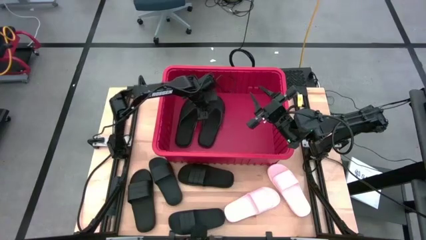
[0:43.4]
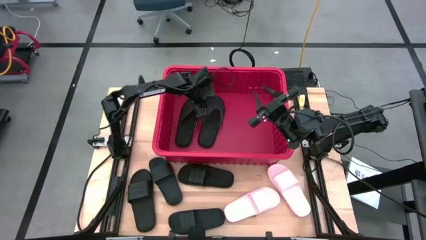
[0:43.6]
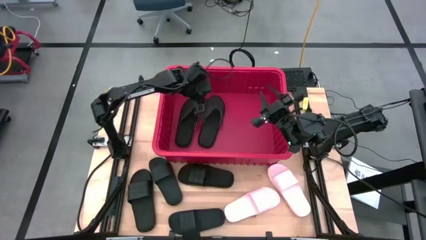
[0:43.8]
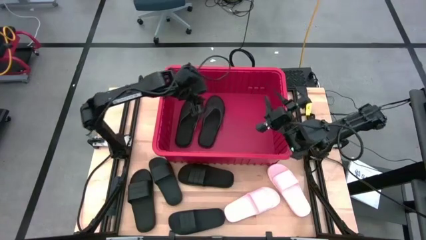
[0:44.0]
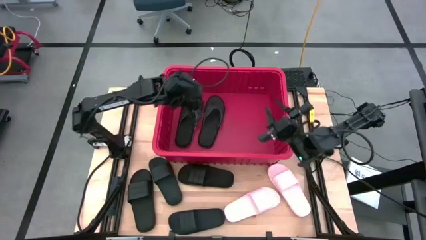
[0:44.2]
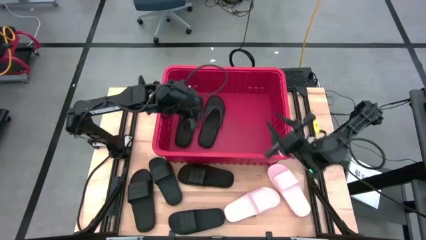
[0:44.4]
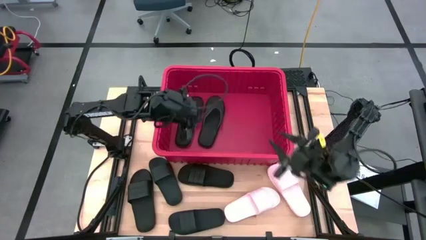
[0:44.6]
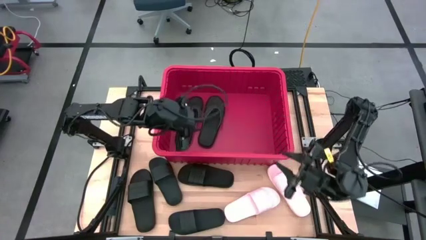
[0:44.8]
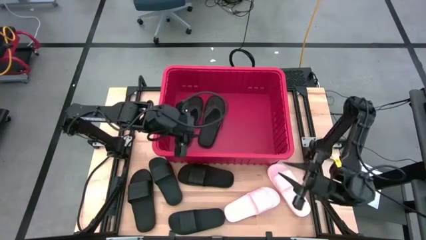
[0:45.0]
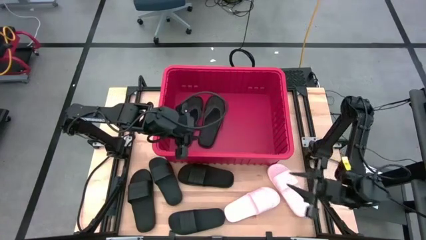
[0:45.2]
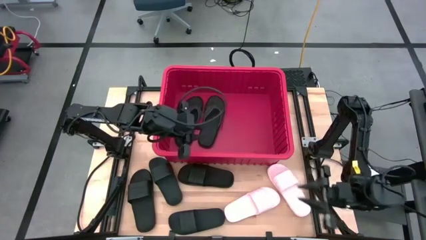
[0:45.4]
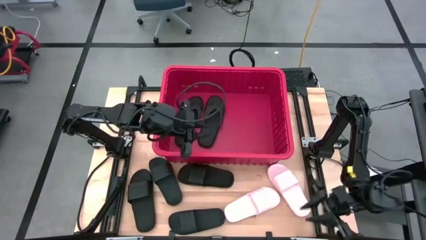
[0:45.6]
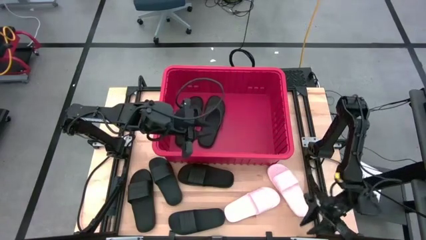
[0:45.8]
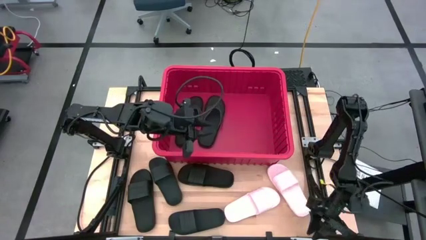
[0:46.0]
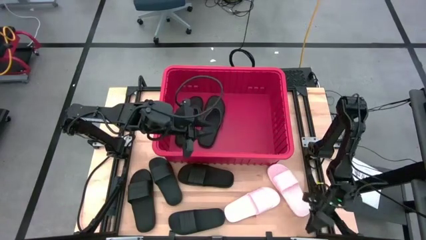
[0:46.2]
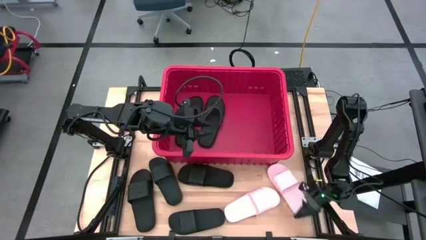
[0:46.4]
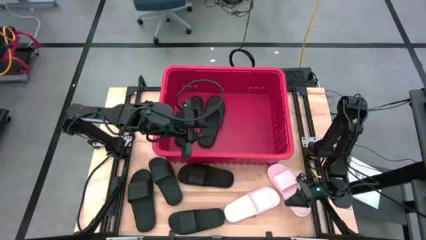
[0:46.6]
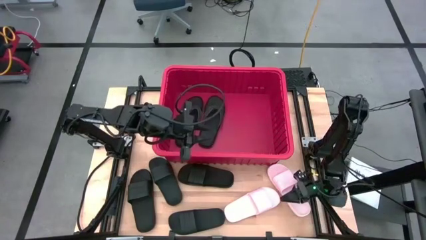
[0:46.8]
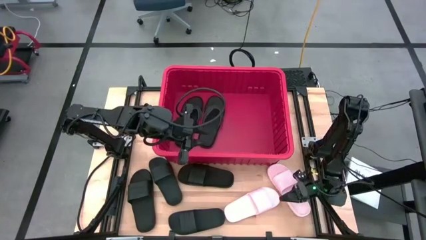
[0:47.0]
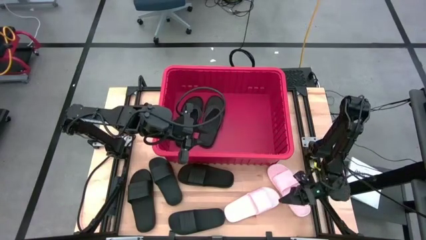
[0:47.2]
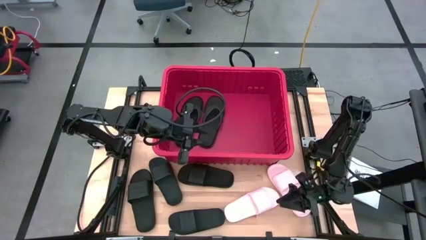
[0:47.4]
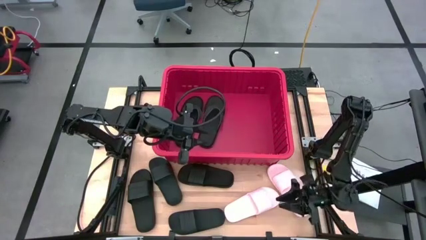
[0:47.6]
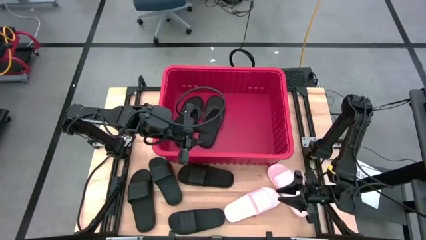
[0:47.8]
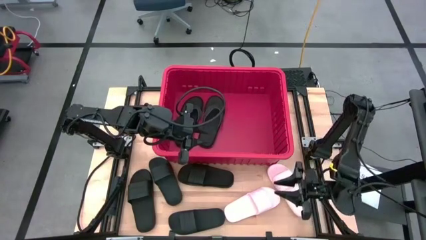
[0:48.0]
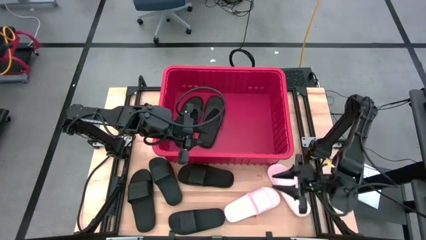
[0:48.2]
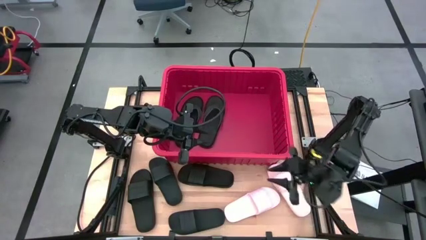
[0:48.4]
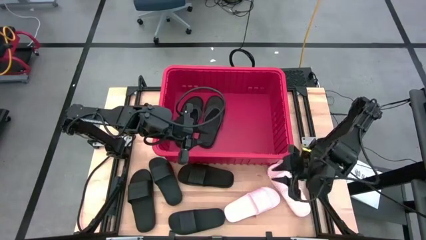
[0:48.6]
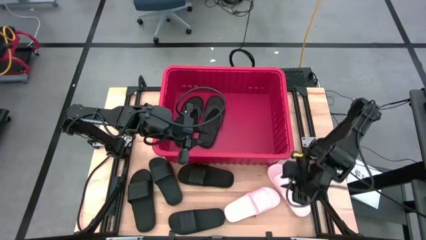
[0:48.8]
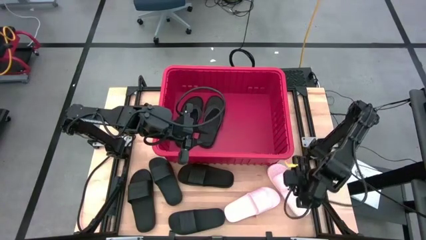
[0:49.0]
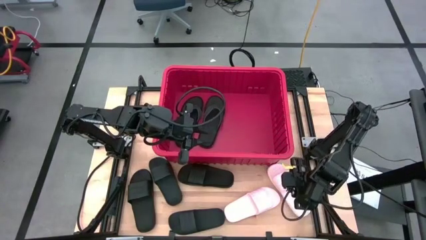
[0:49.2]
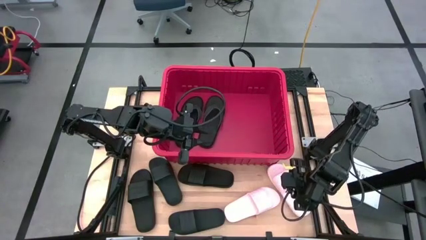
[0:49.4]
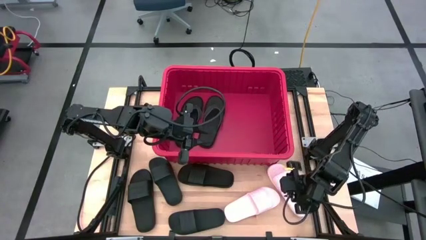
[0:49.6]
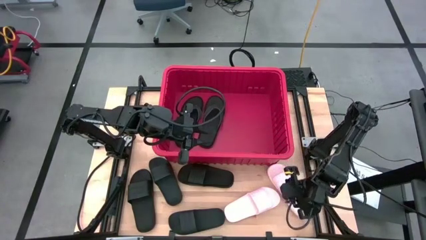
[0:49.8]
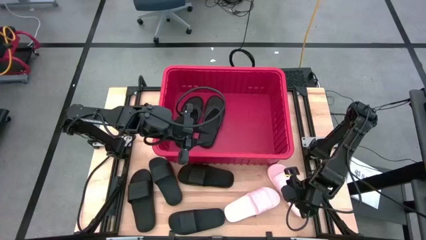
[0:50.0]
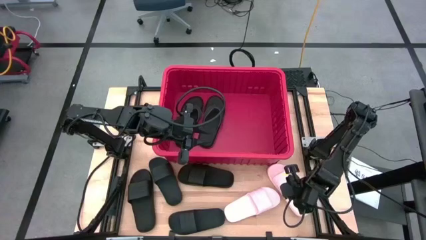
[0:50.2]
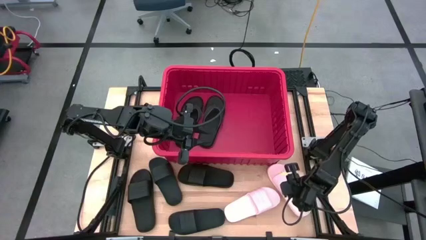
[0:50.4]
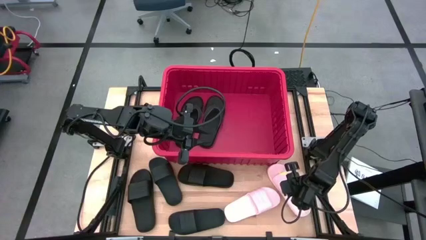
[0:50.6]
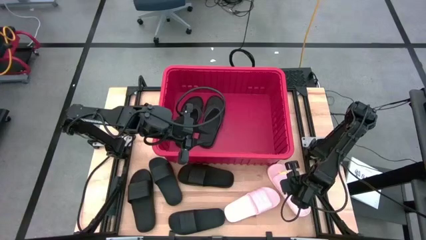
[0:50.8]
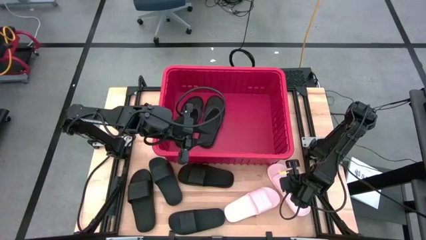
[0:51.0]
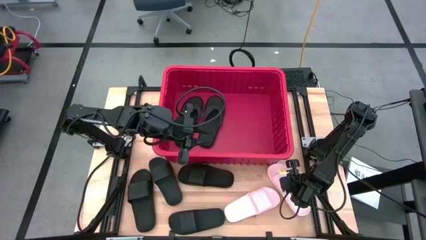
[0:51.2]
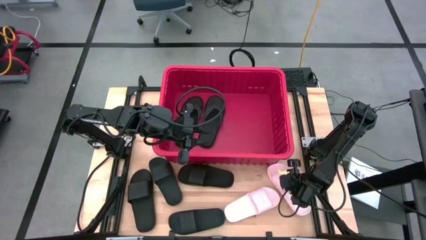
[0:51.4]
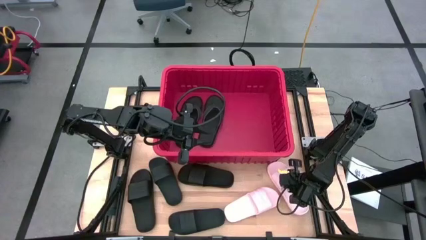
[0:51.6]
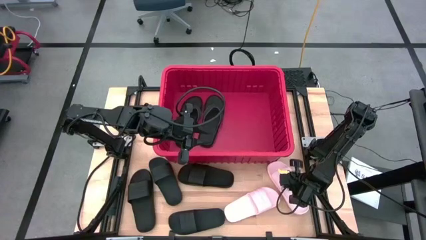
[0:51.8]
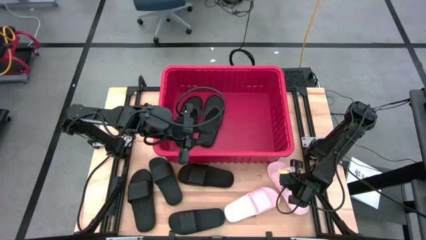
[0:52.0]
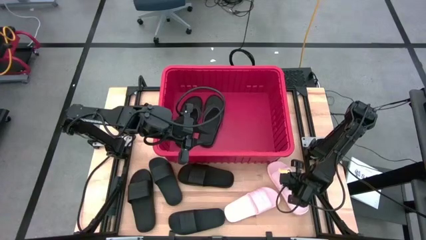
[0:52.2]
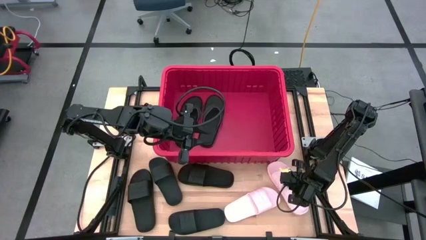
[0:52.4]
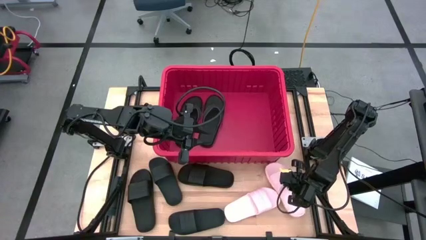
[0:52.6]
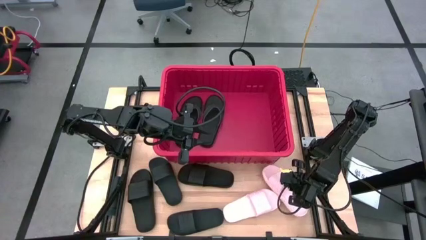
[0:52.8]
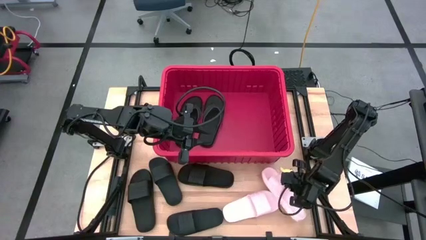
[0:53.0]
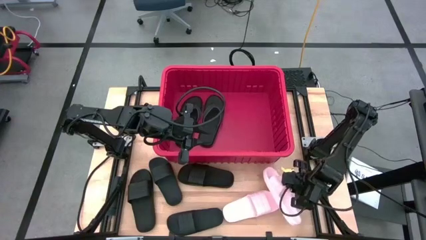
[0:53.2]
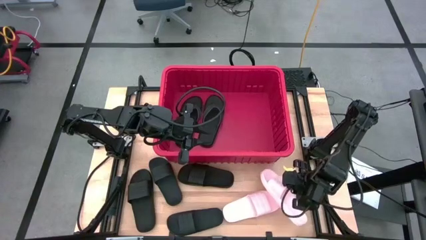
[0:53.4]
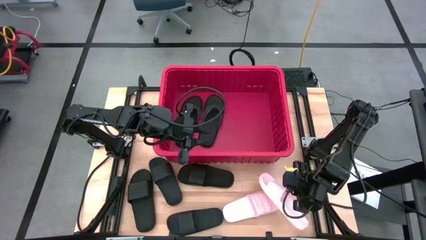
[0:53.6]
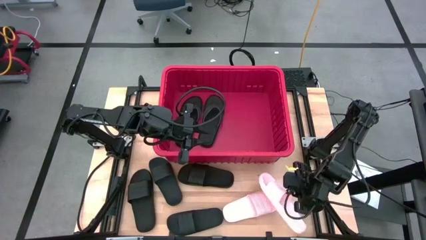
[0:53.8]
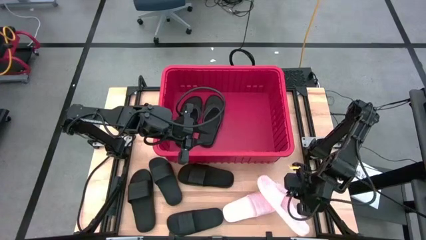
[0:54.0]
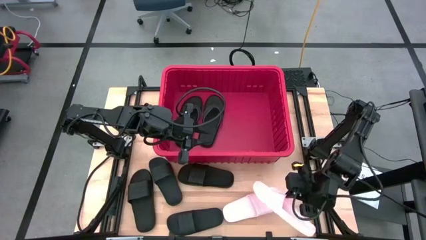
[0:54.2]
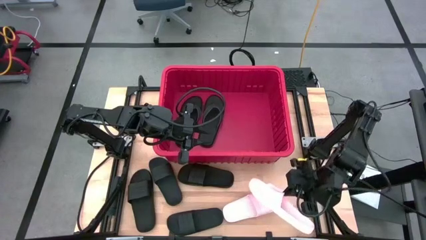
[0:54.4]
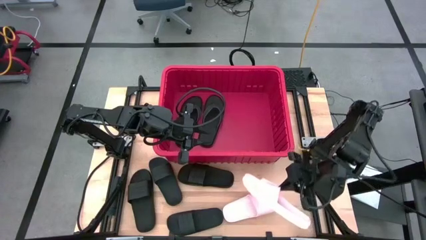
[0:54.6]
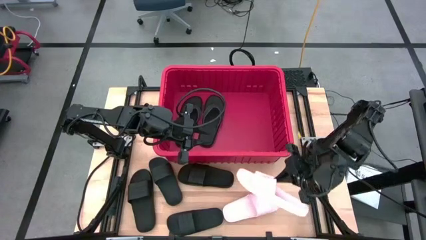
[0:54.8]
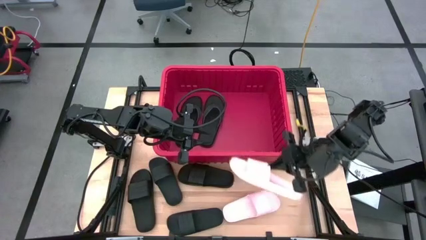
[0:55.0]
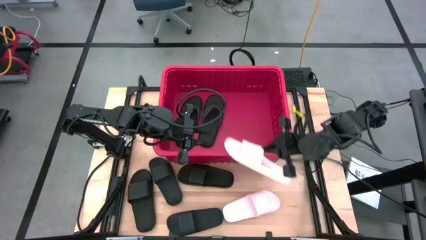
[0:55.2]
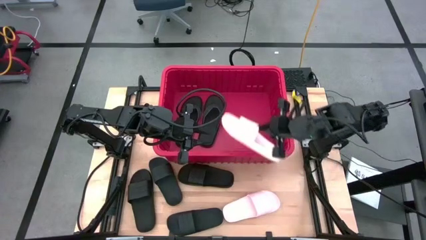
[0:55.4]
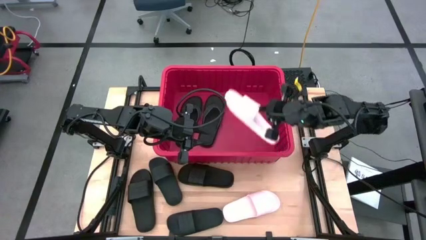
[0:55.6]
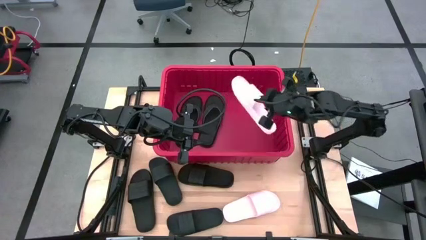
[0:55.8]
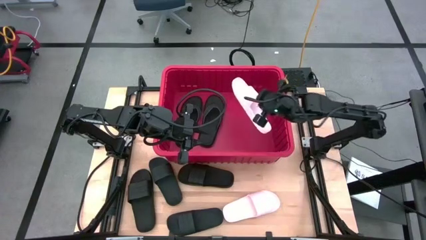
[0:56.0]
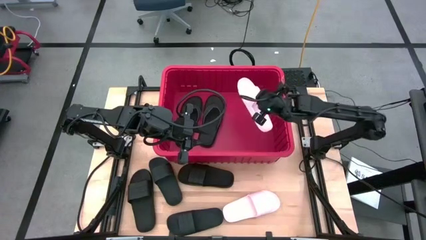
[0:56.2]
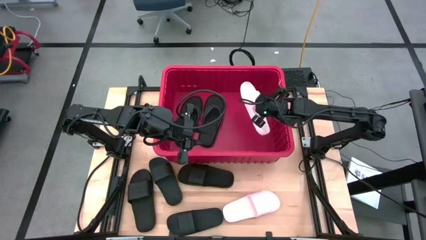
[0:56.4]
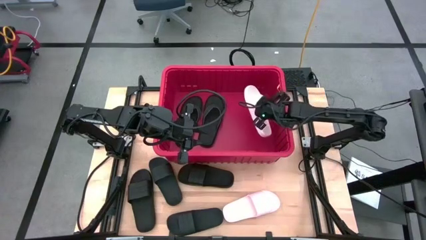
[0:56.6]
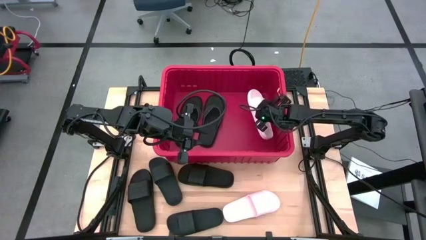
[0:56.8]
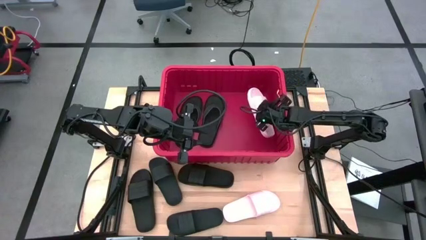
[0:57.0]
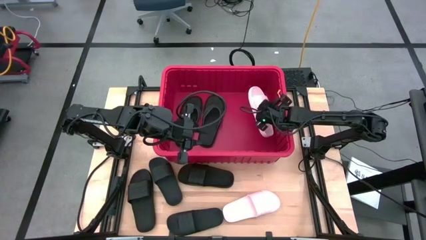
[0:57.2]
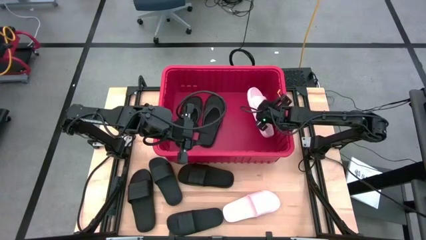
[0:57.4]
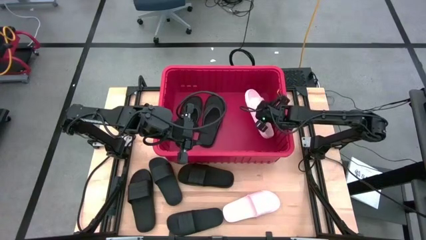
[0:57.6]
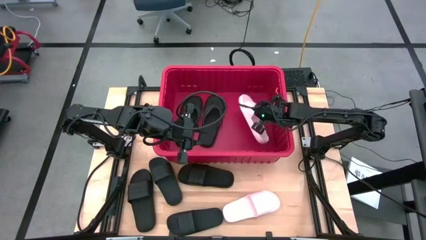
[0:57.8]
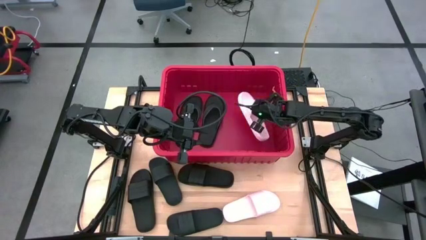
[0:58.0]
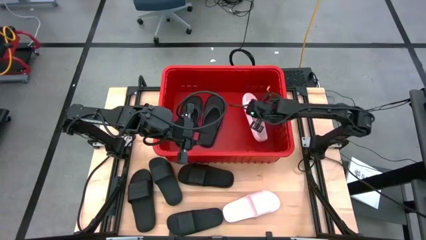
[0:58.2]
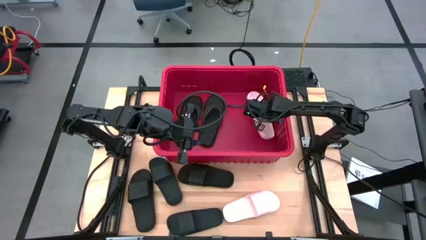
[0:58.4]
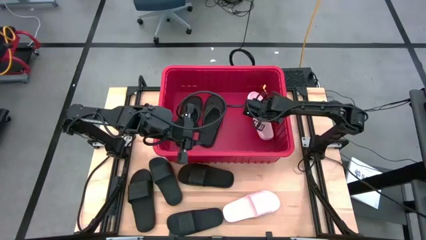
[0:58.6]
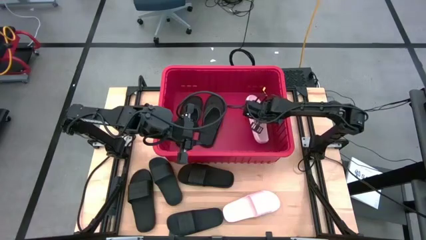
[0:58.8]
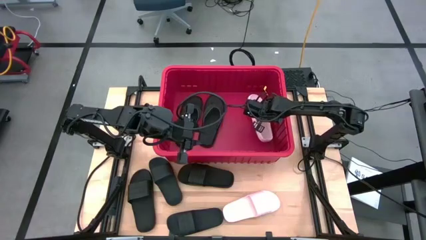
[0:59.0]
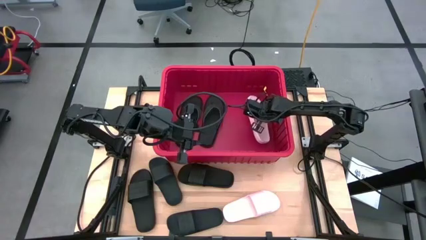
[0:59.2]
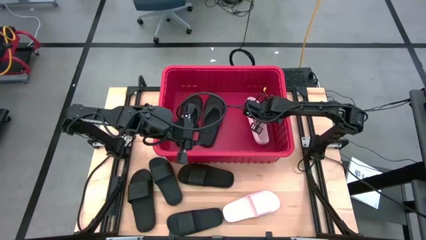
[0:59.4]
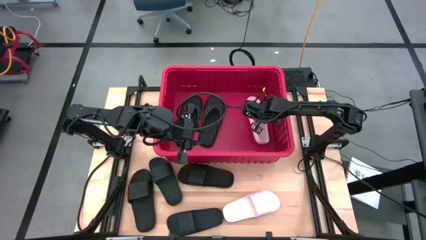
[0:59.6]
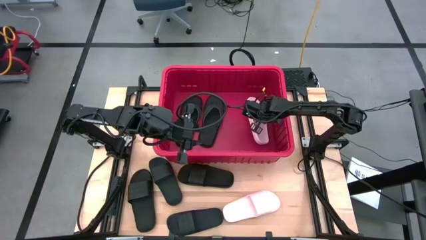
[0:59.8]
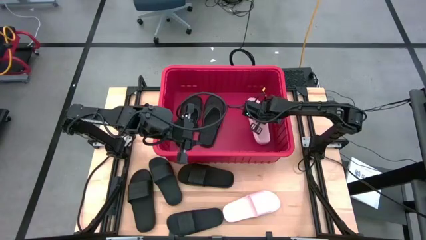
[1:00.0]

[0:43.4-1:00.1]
Task: Pick and place slides into bin
Put the pink slide into the red bin
